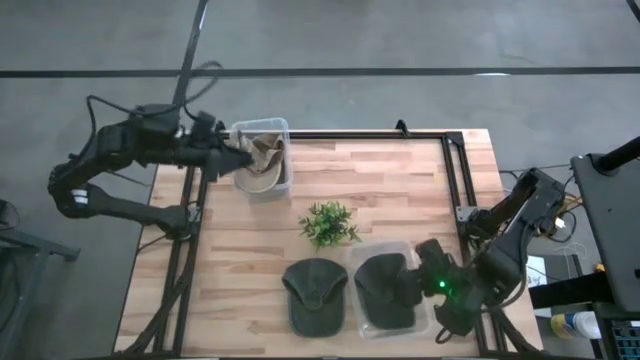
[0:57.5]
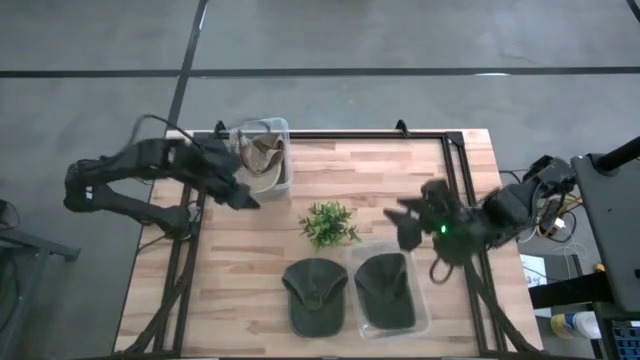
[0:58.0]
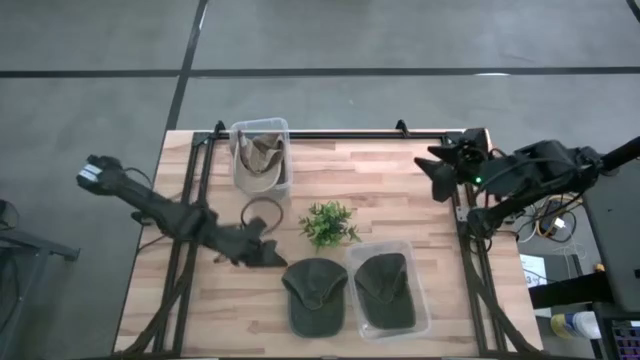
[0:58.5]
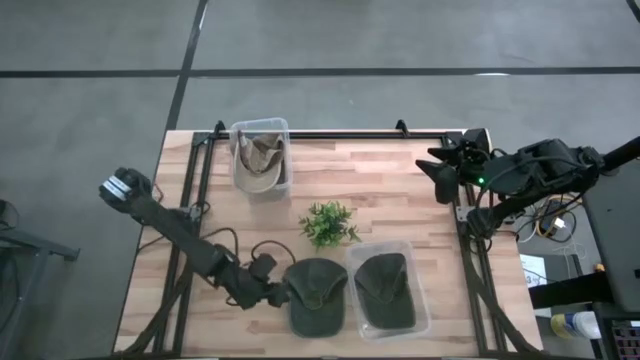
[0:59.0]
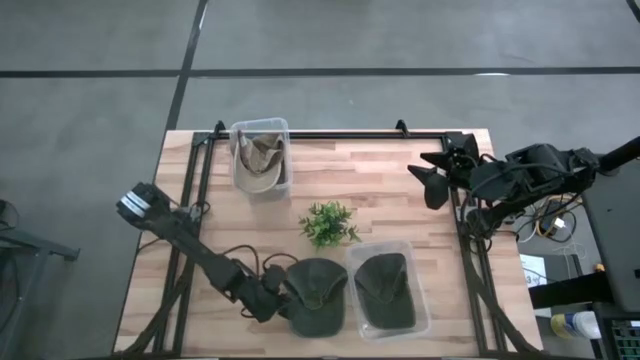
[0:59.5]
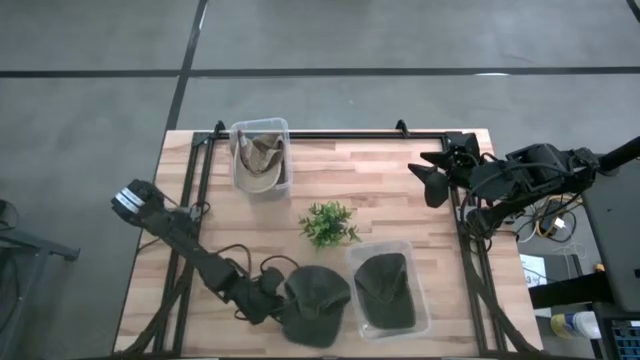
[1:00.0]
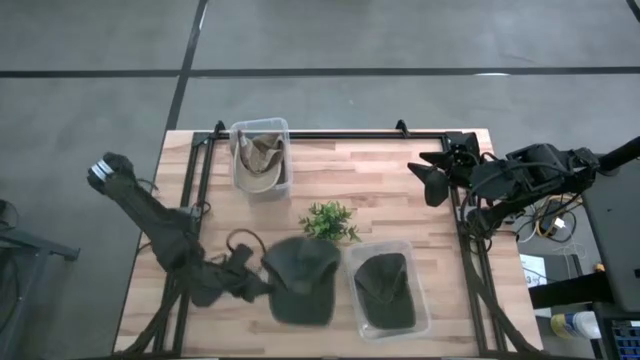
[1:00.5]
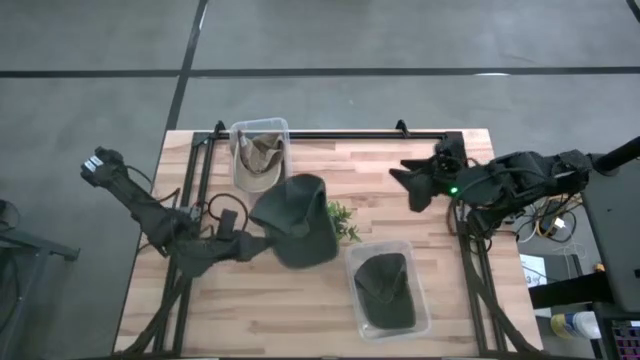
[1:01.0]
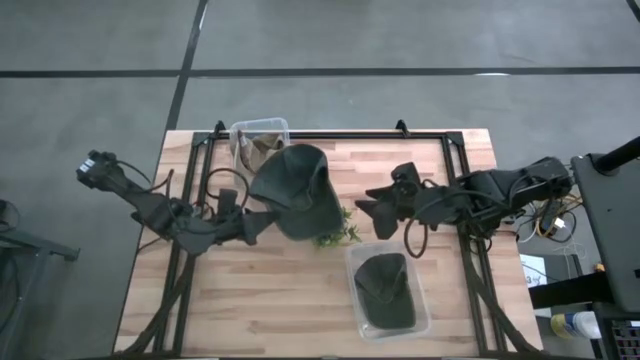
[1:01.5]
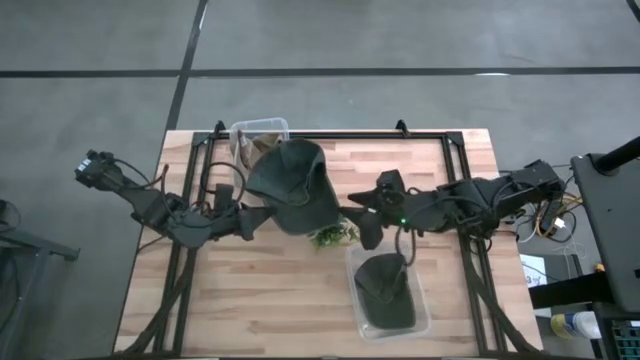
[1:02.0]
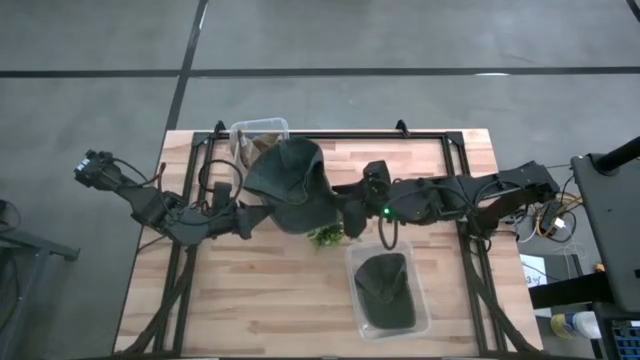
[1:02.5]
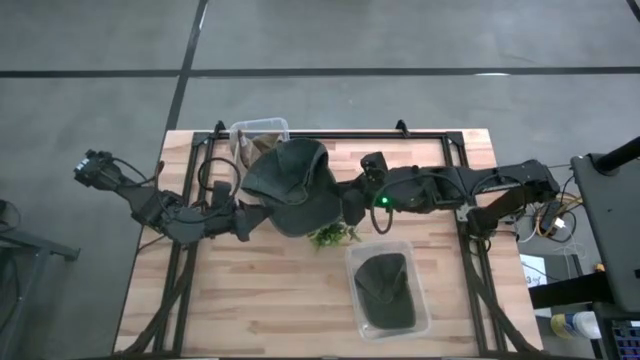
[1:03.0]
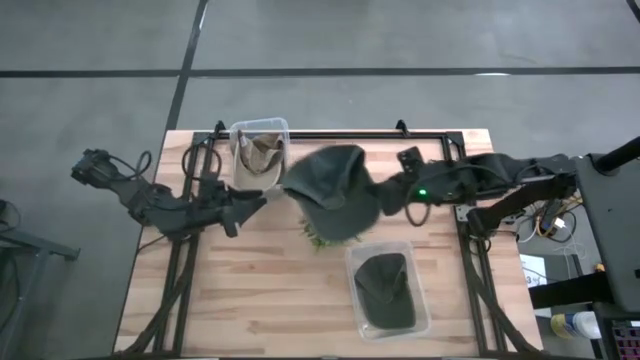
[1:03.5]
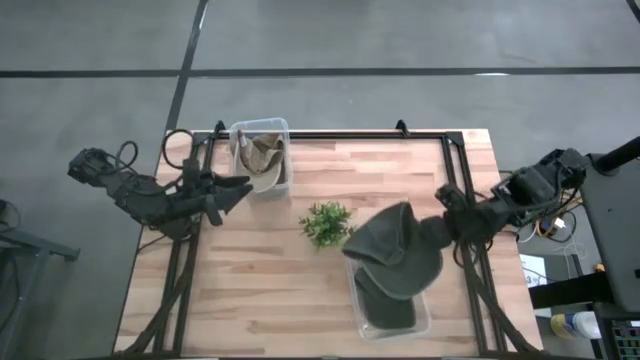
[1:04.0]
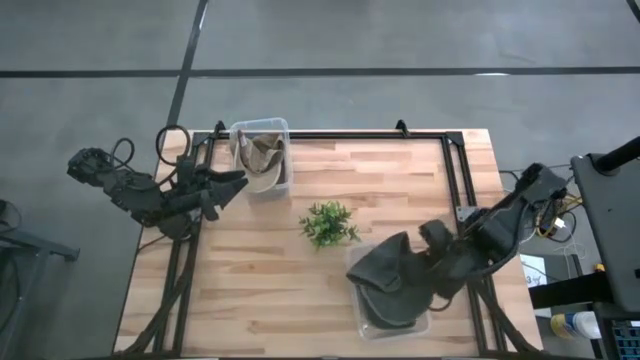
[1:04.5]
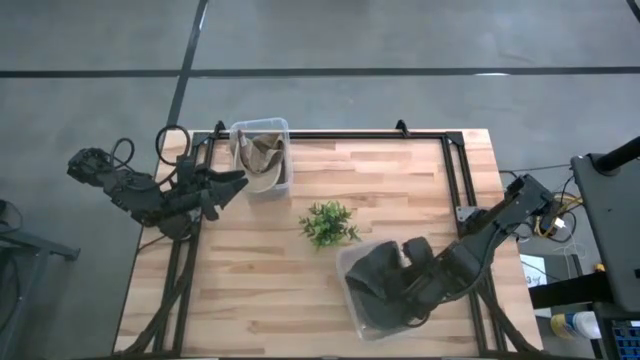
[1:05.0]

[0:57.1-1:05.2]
Task: Pick & Place hat
Put the green cap into the bottom transparent bin

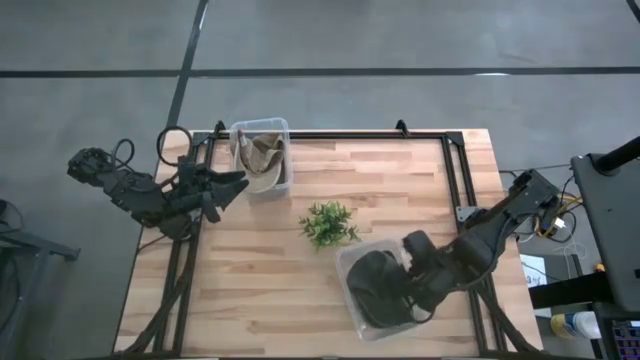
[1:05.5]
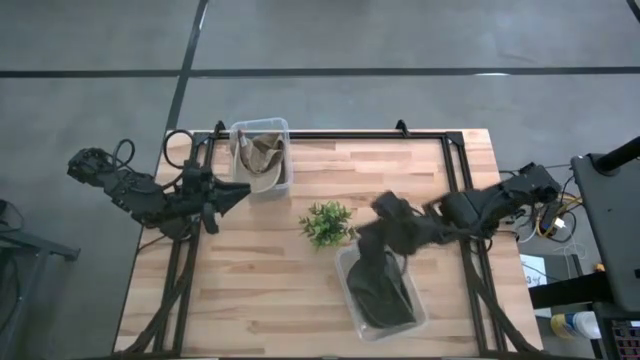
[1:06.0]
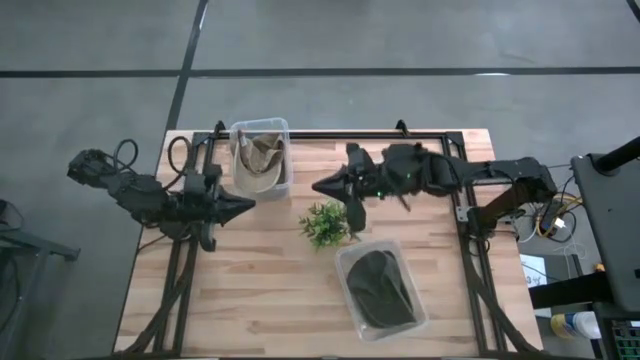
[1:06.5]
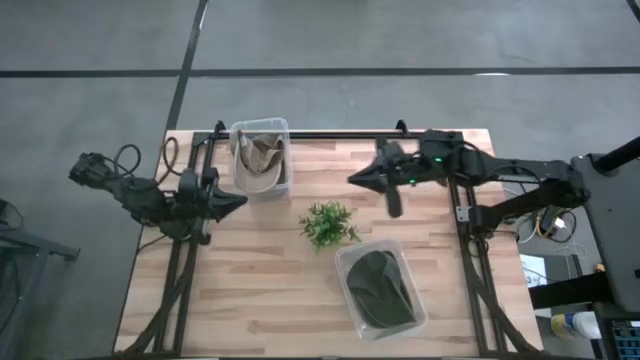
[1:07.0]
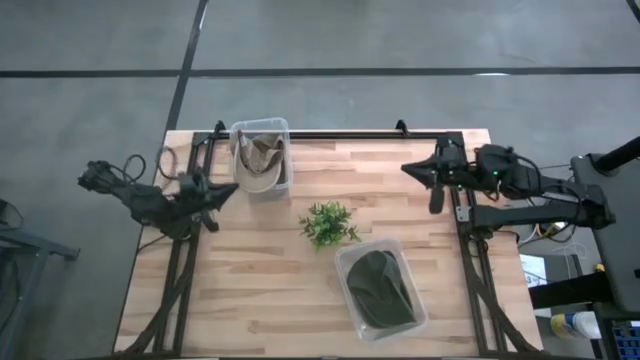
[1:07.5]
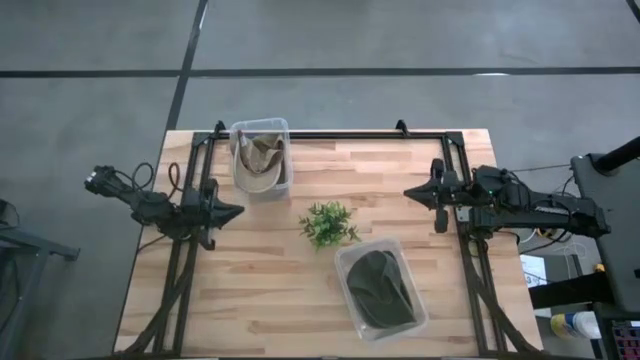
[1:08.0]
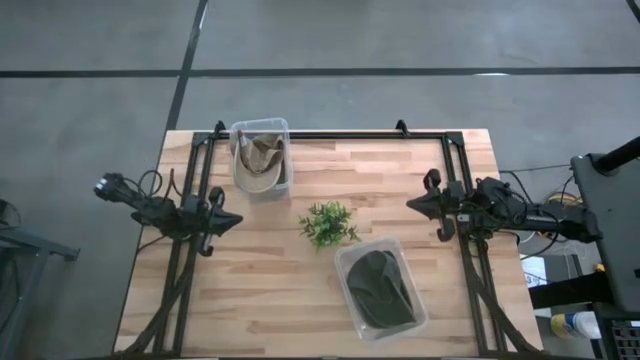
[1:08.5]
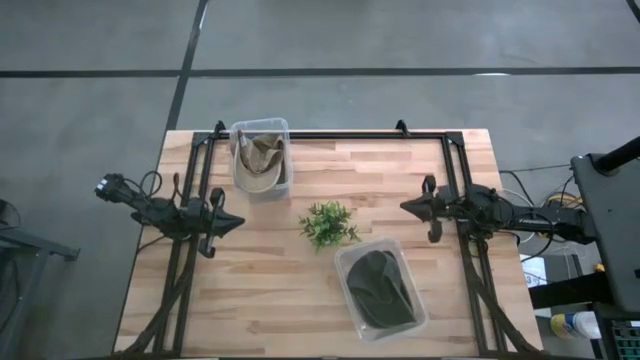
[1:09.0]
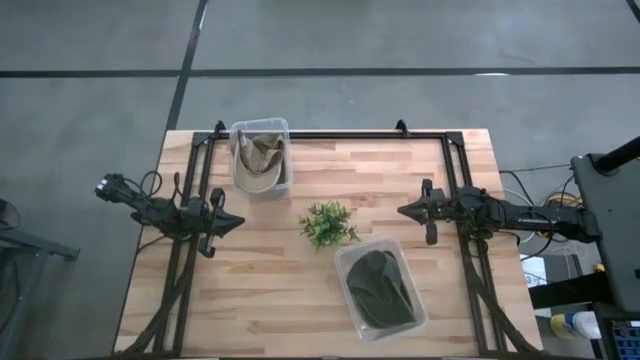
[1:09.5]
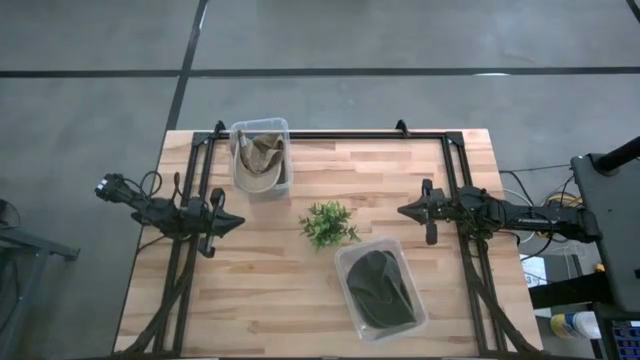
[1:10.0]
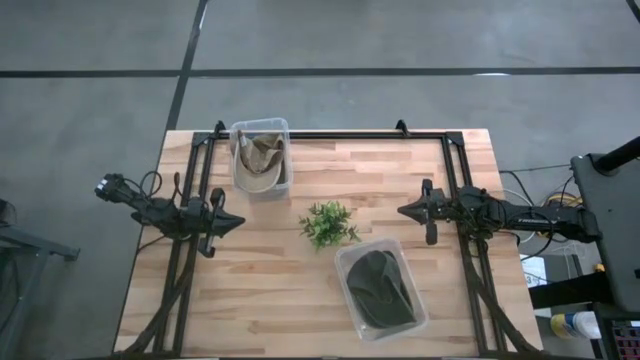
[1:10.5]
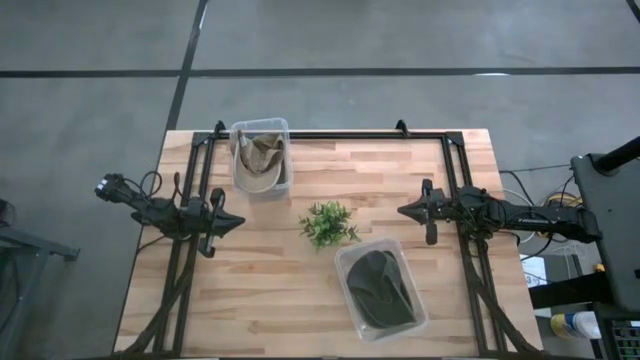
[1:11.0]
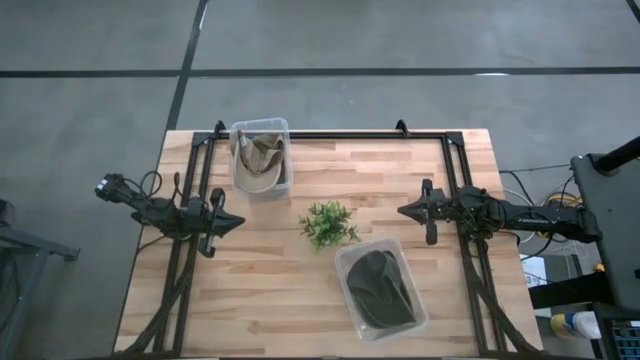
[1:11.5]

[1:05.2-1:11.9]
Return to Home Position

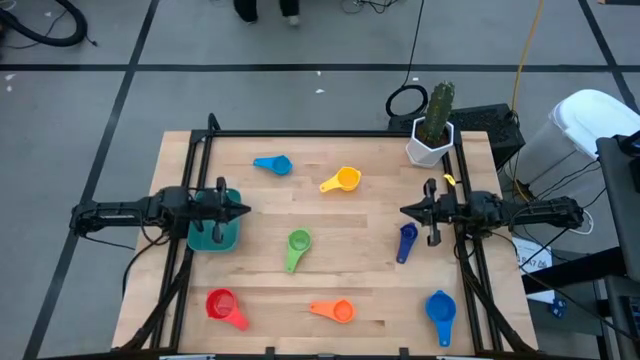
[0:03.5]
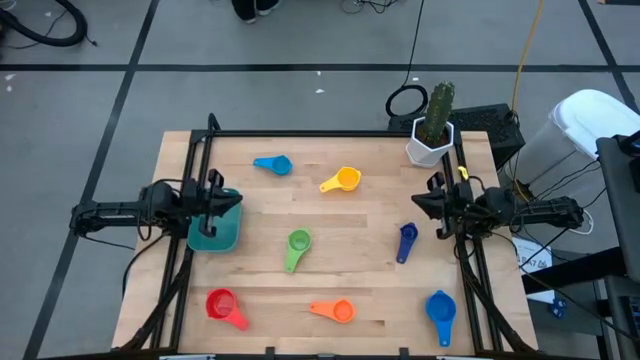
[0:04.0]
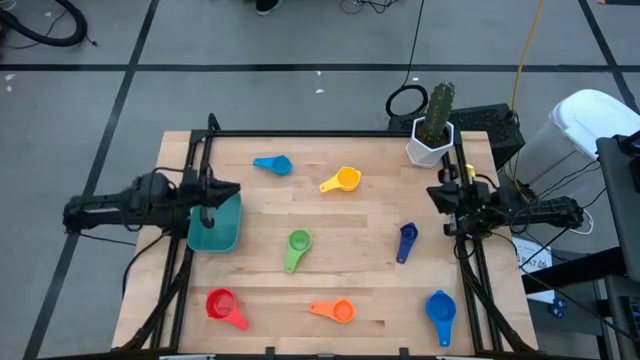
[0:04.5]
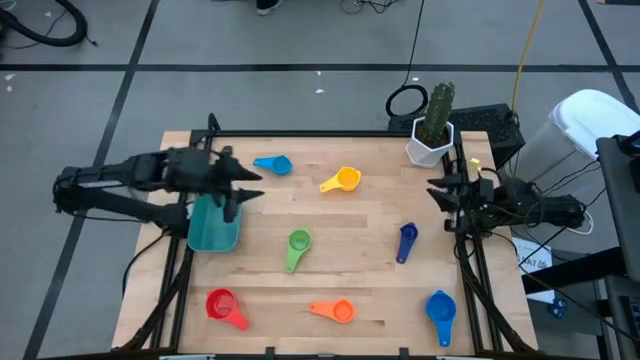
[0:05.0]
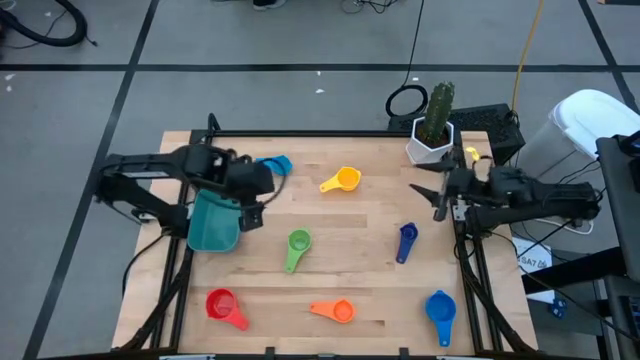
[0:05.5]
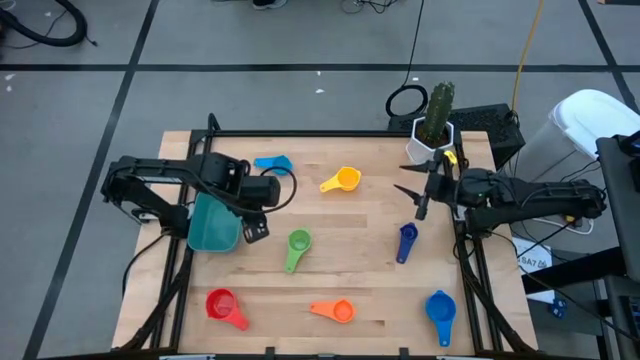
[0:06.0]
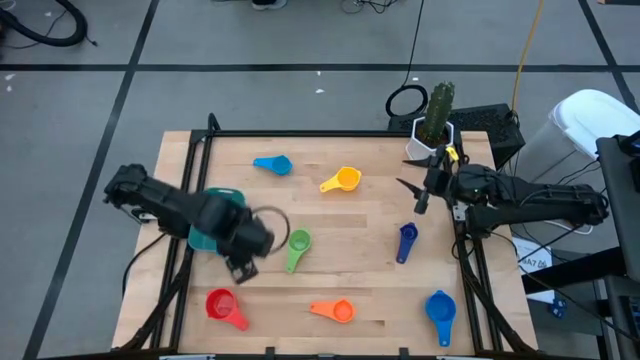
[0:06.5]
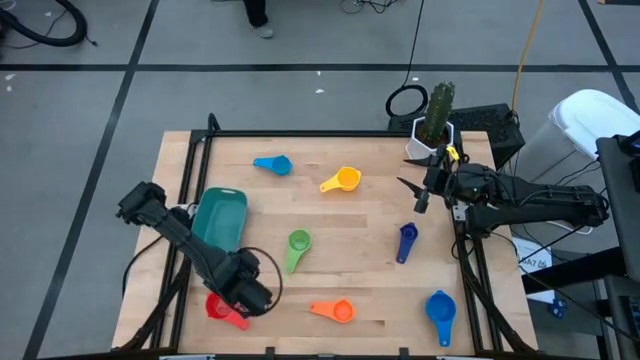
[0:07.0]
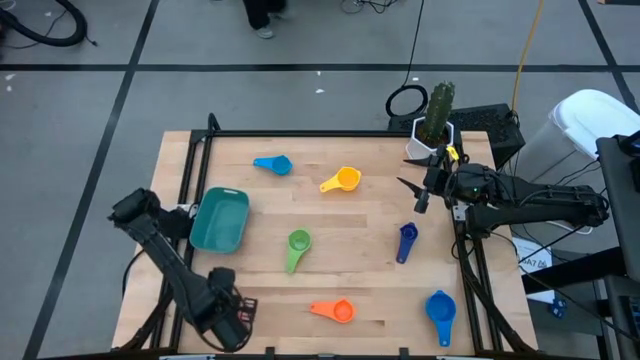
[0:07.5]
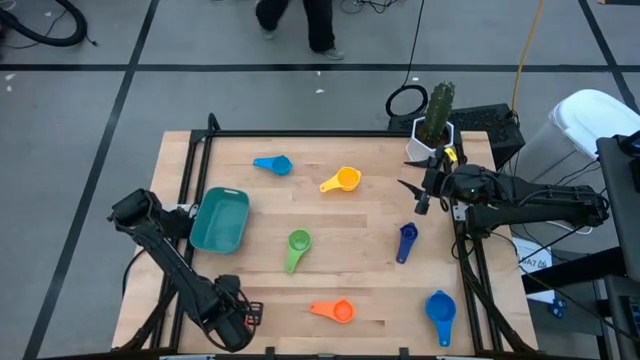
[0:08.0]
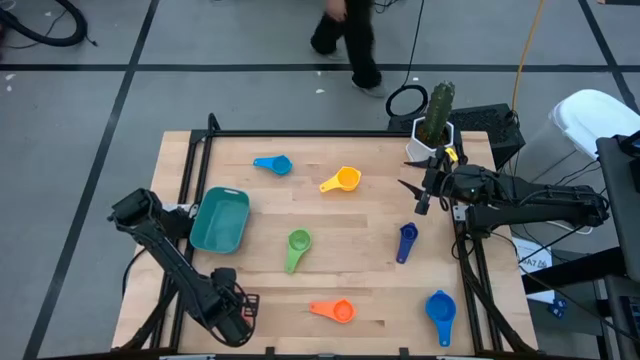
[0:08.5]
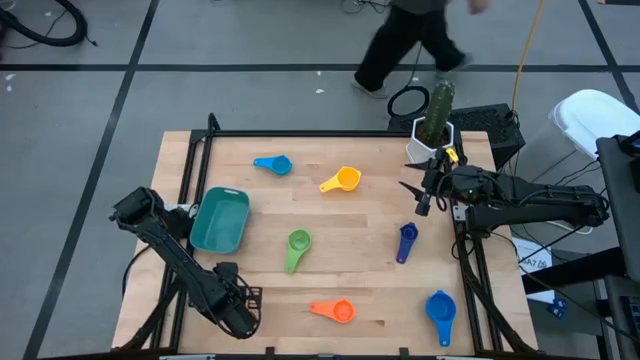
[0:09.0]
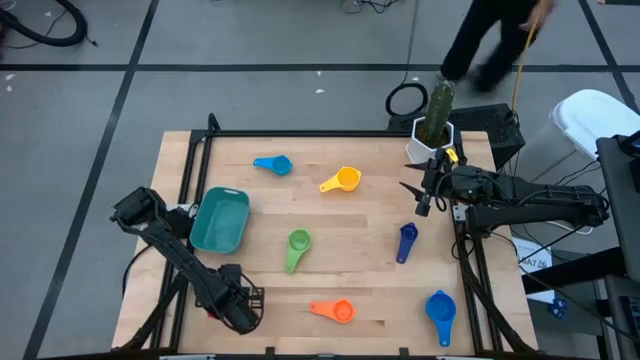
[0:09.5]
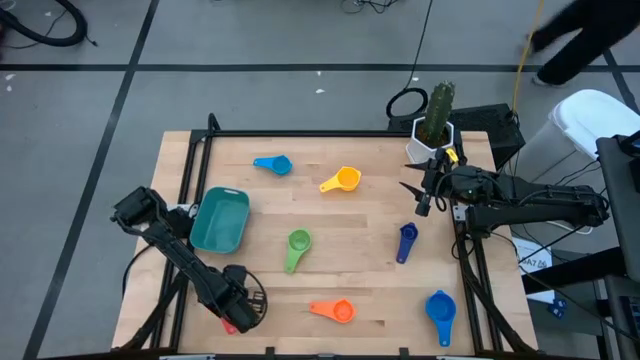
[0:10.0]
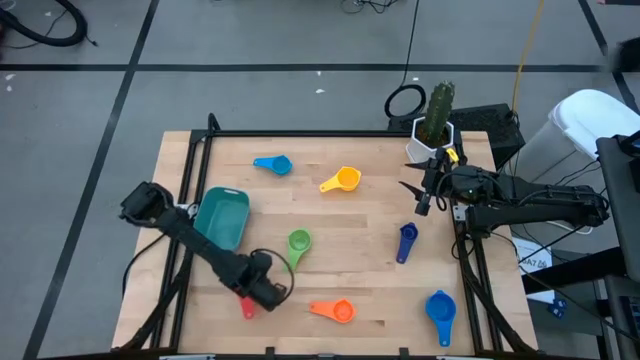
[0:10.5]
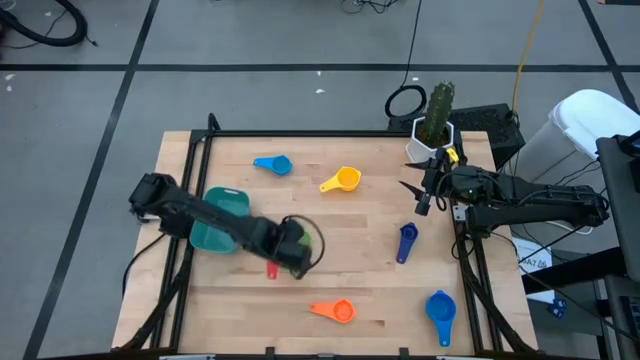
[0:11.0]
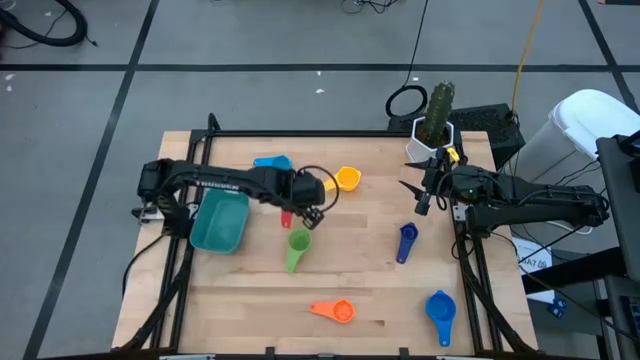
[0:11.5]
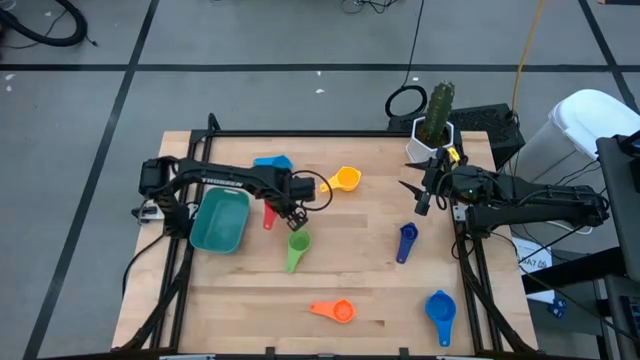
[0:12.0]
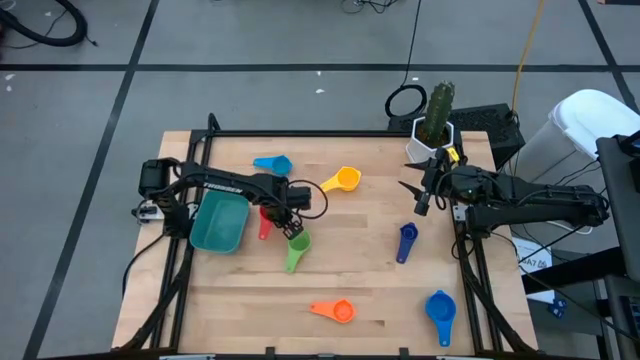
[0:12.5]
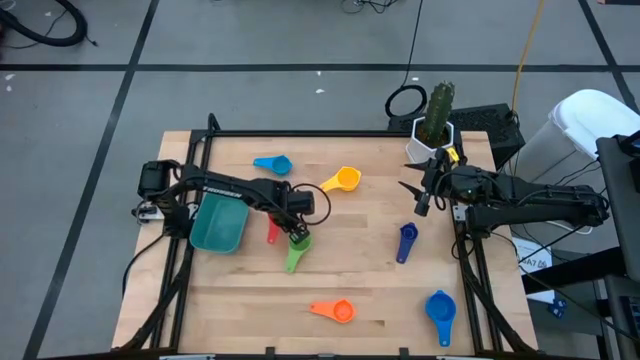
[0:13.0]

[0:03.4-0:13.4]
Task: Nest measuring cups in basket
Move the red measuring cup to the center of the table
